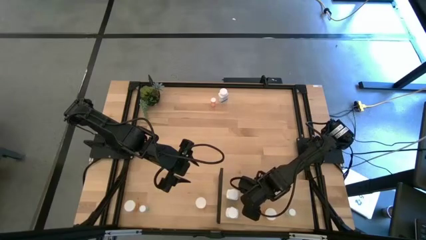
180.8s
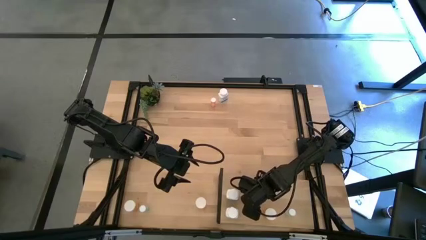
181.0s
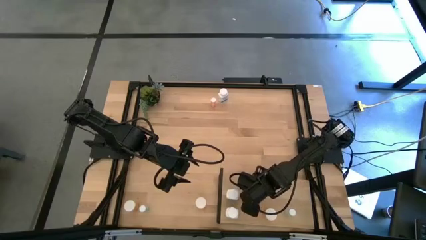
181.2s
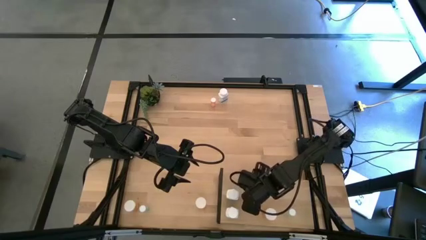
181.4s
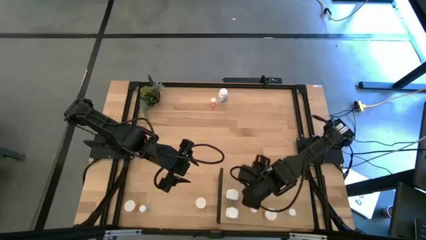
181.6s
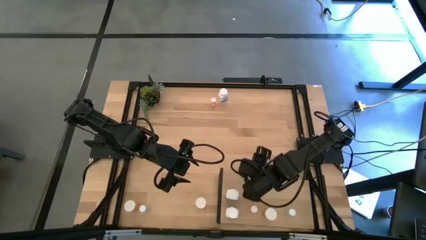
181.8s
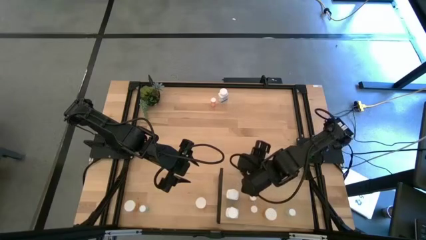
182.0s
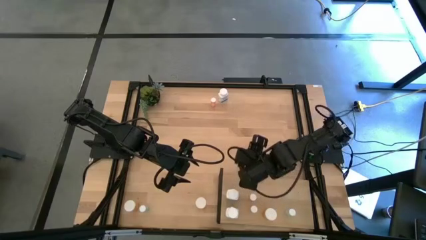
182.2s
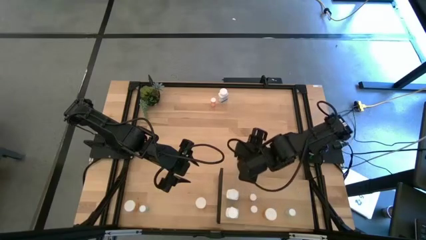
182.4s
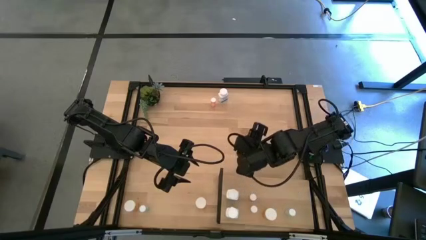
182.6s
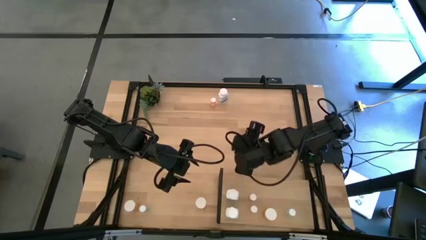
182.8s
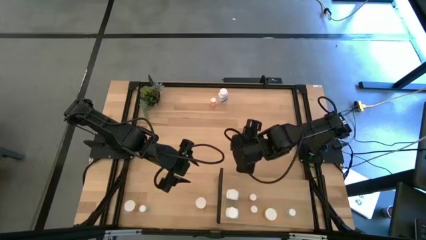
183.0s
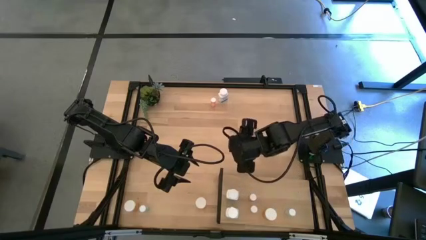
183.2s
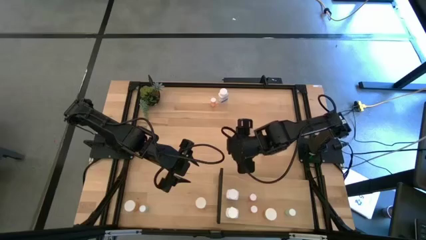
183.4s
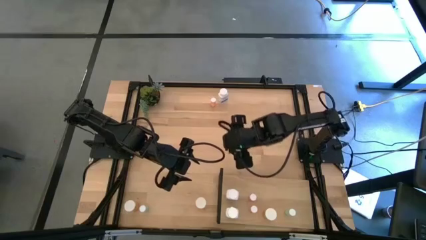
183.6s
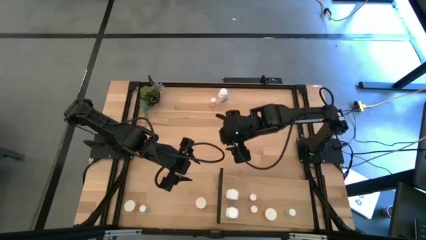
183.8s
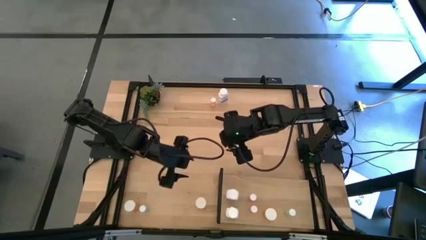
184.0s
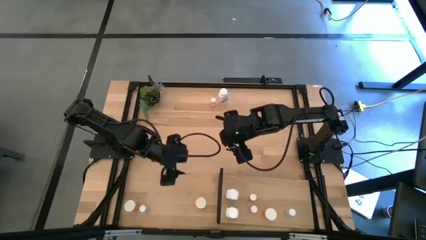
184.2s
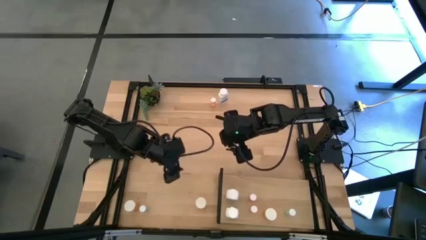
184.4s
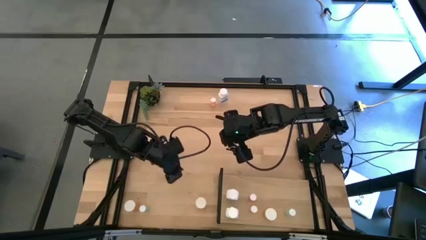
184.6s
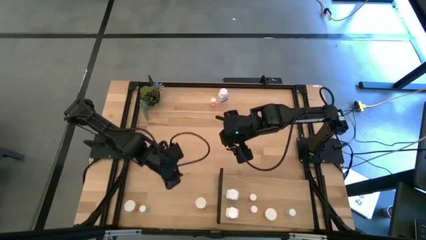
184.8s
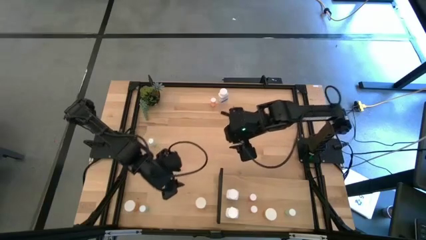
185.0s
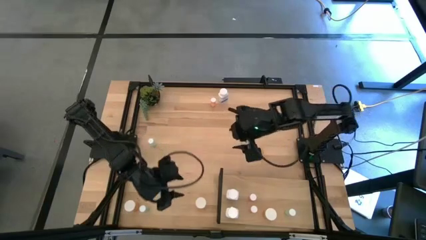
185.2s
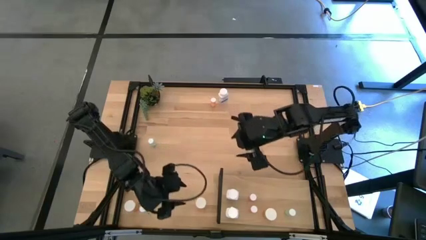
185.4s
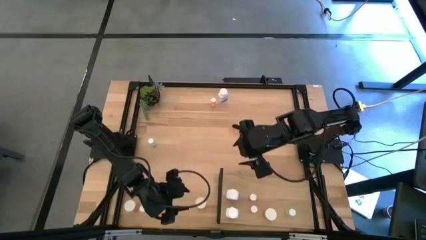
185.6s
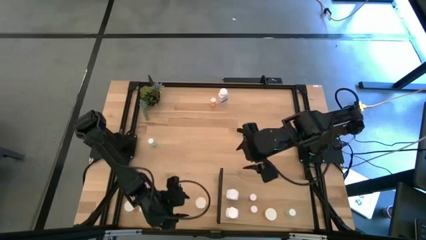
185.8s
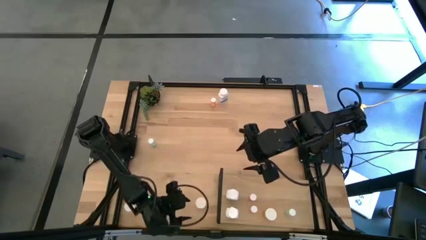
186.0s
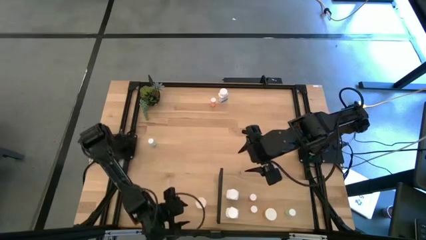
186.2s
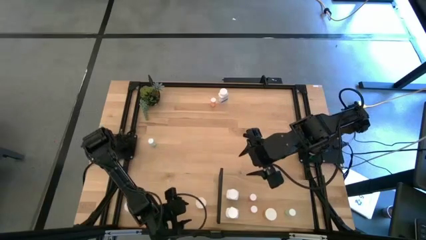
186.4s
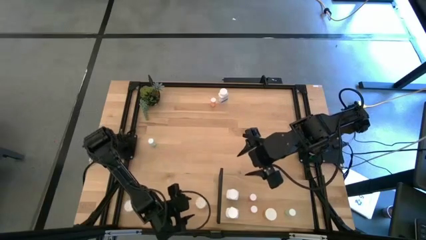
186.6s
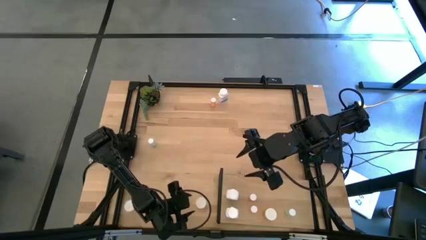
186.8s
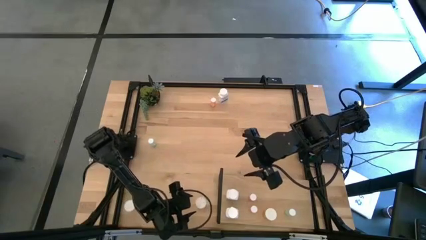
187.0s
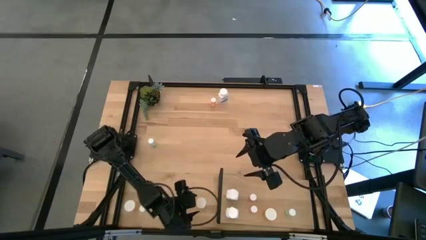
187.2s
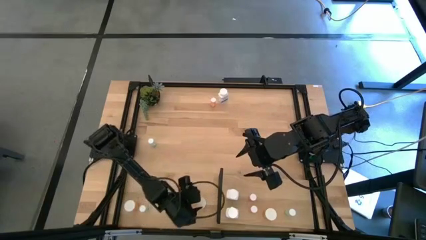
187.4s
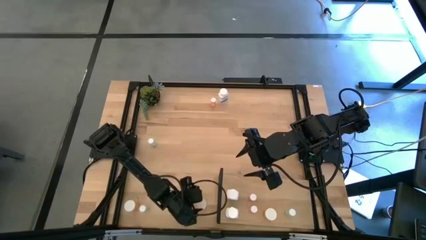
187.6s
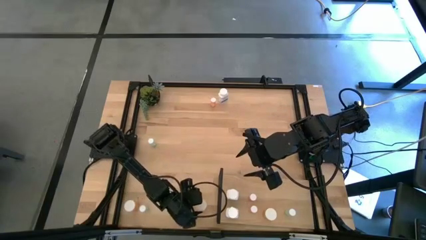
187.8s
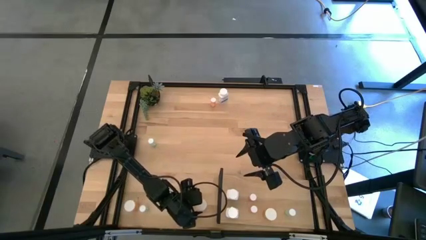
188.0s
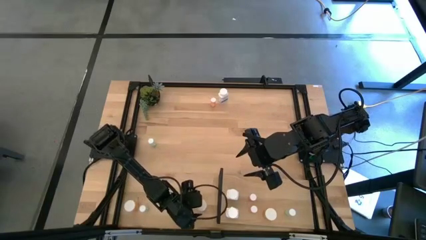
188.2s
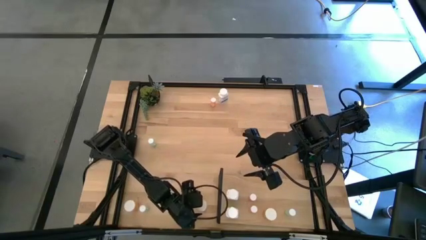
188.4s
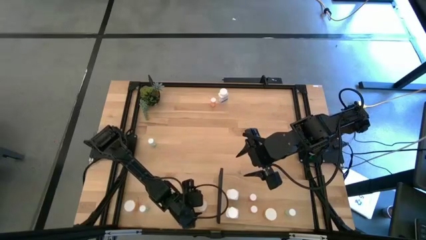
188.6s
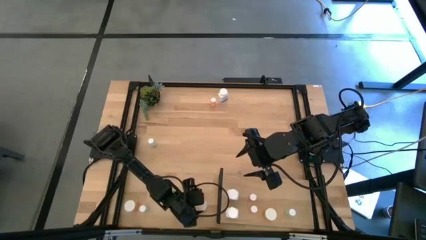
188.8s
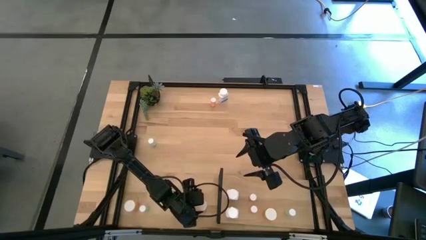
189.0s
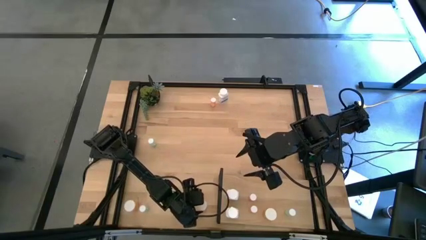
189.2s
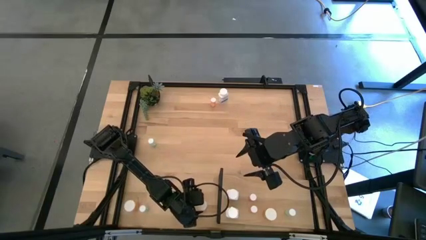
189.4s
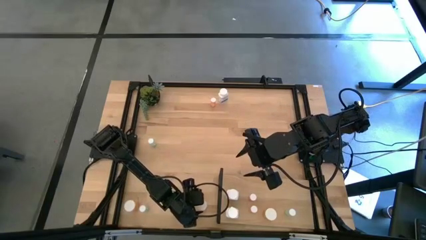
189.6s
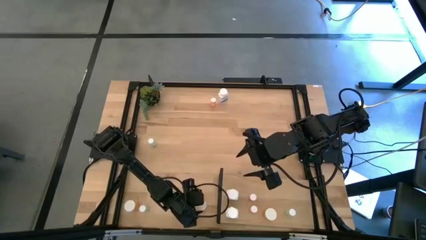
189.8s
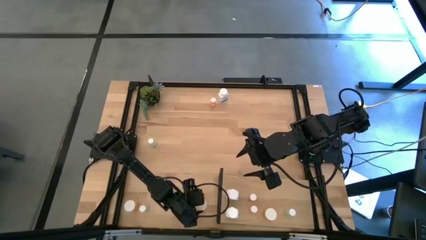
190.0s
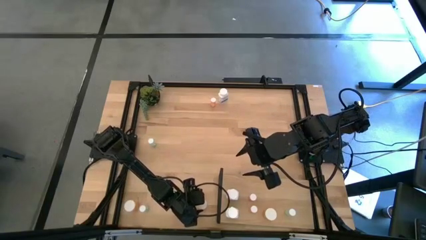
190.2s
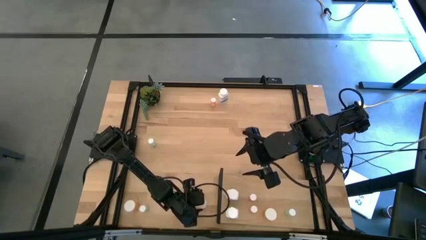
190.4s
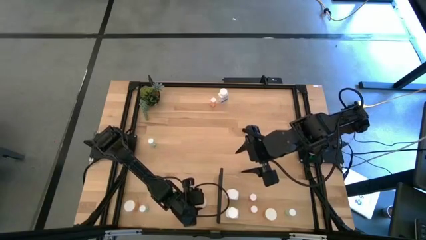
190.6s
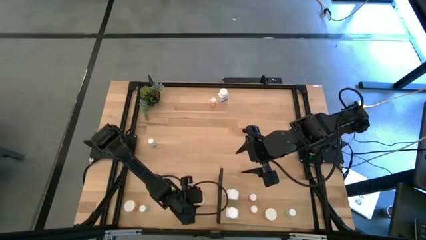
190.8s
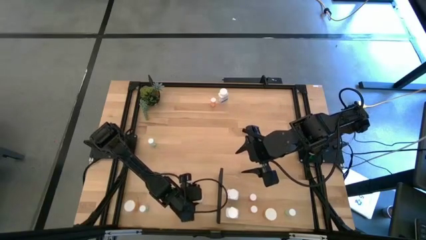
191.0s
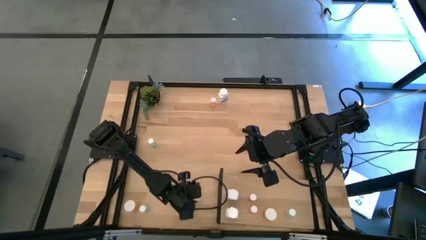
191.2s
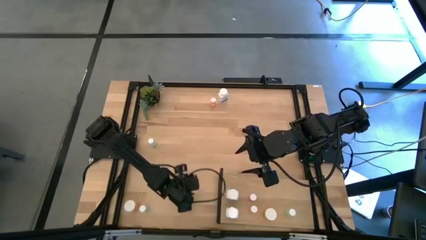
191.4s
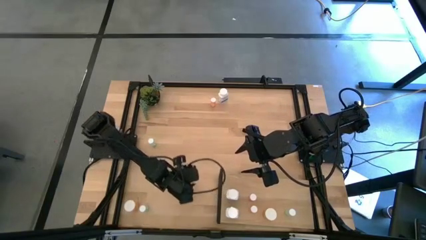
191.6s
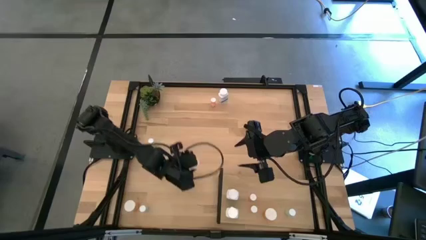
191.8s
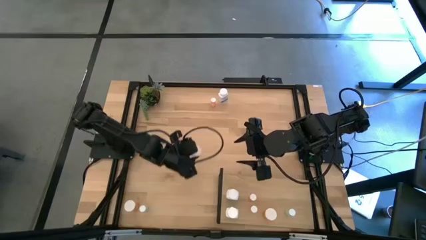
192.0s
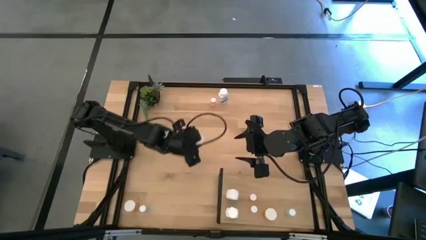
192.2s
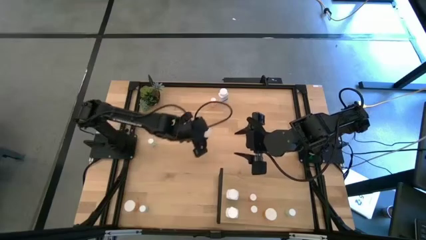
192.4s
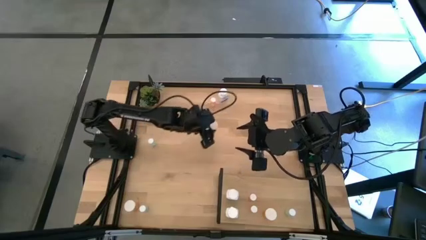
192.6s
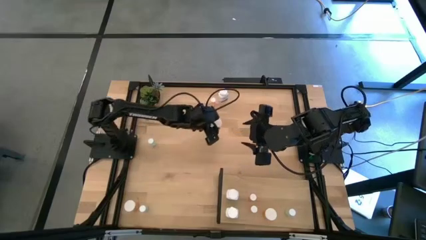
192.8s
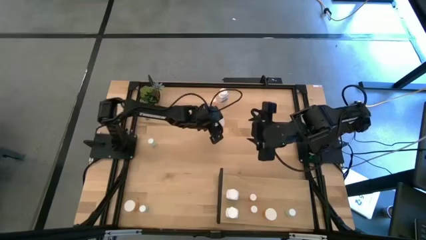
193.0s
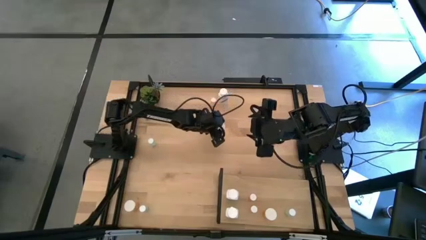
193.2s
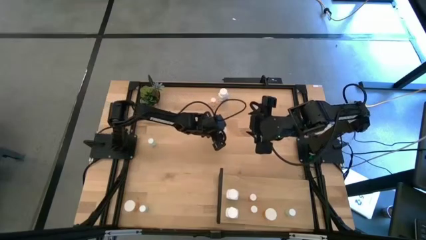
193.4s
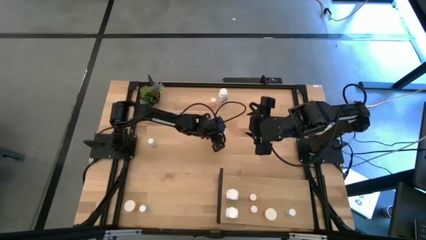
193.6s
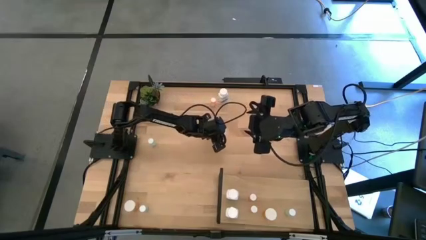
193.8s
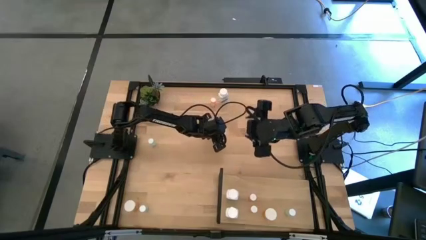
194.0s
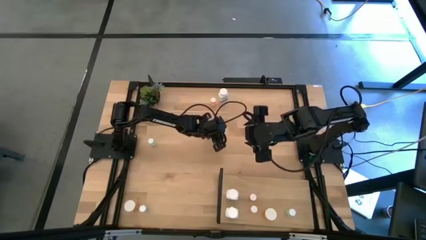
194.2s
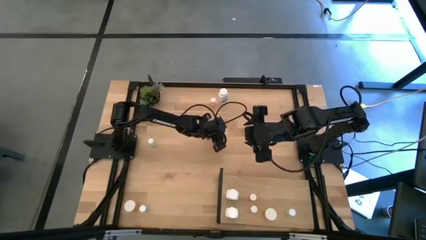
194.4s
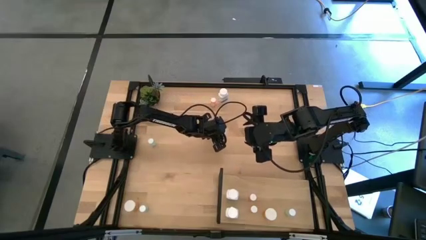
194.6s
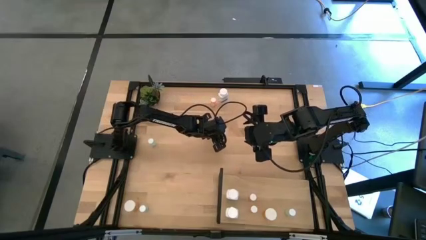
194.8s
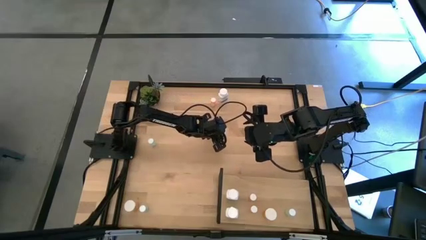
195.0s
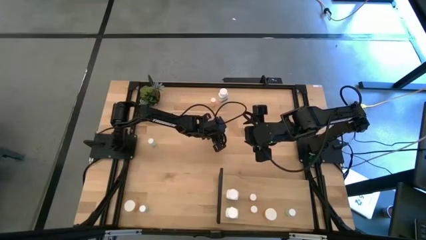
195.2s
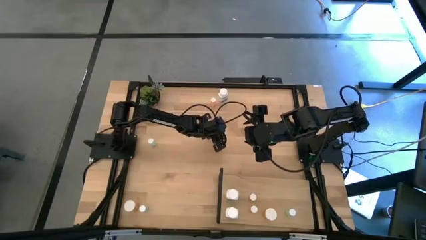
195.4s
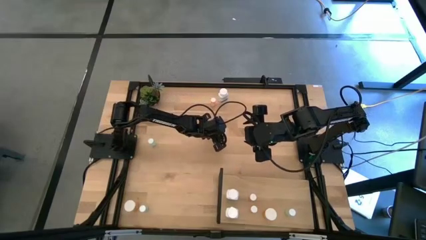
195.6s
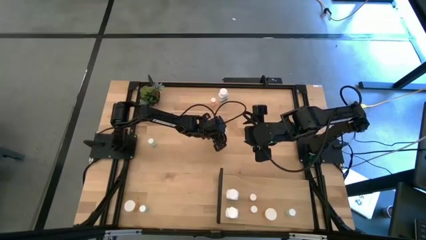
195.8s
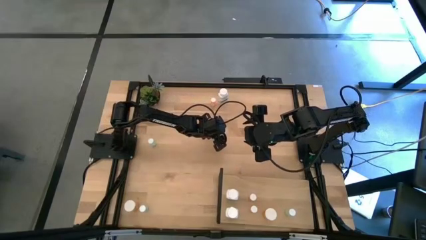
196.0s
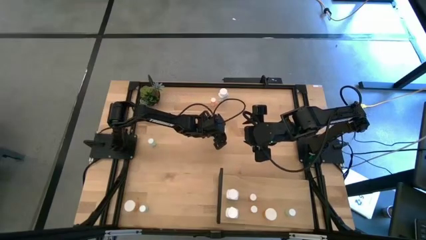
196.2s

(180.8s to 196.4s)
Task: Pick and place medicine bottles onto shelf by color
Put the bottom center orange pill bottle on the shelf
